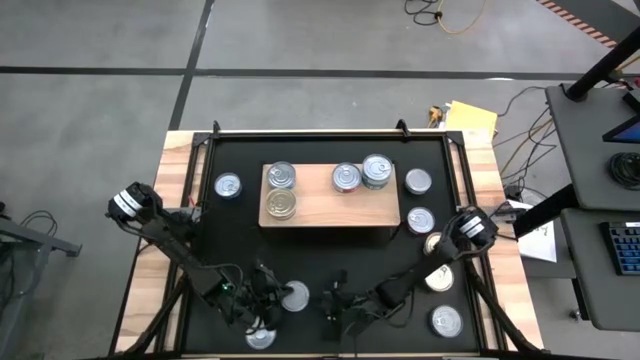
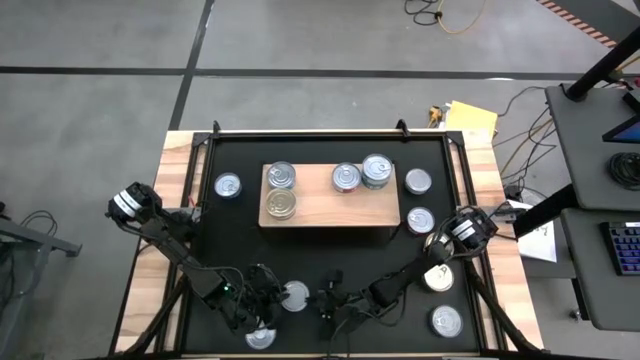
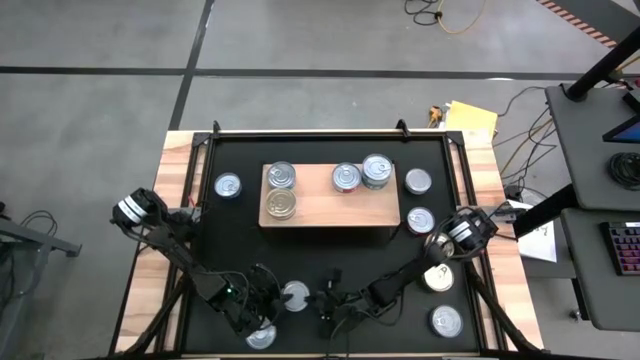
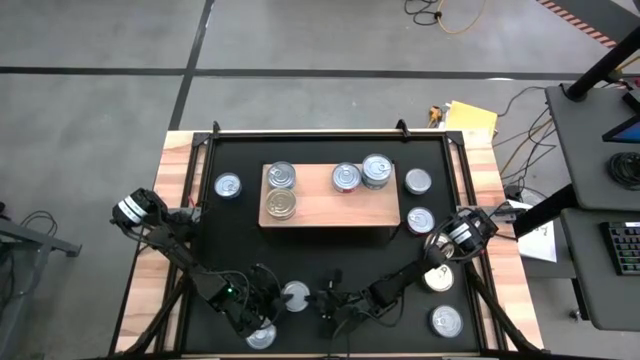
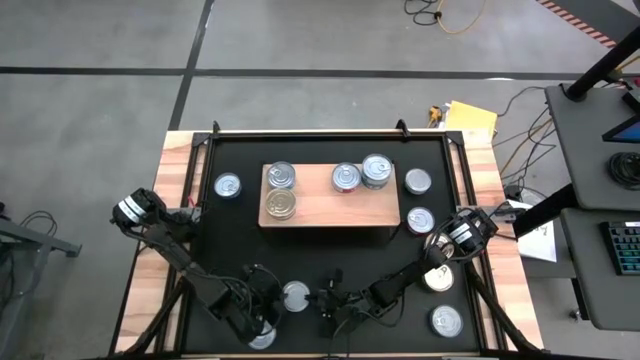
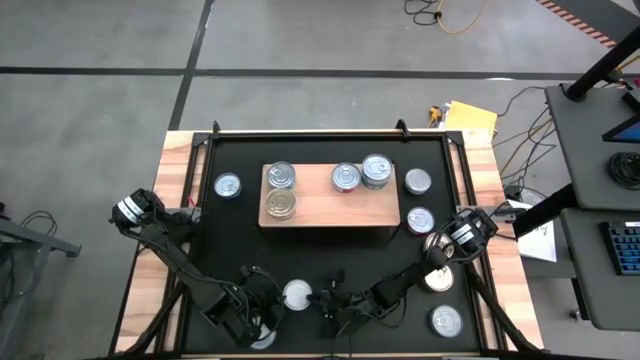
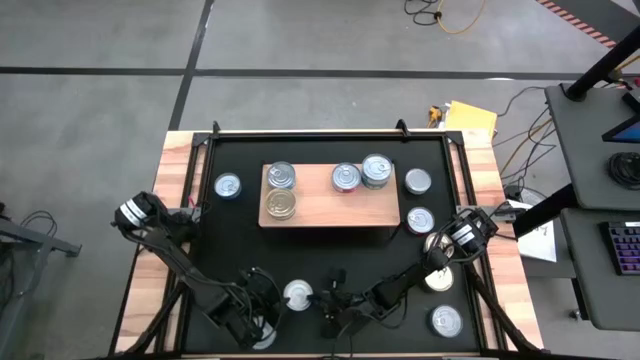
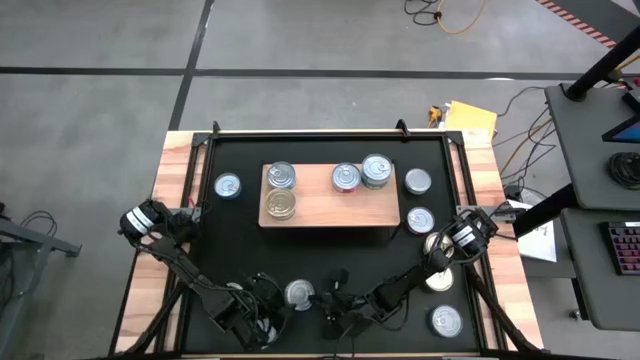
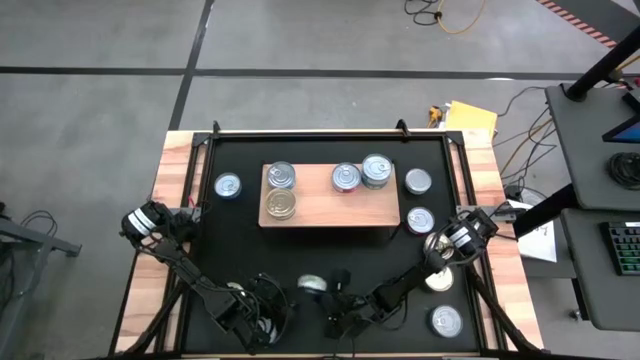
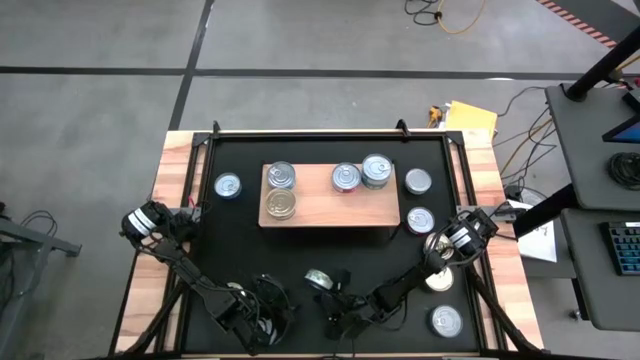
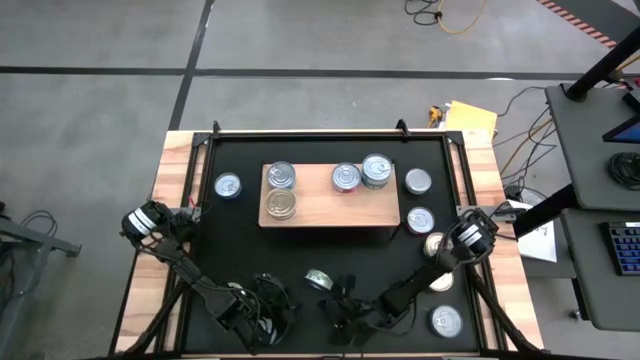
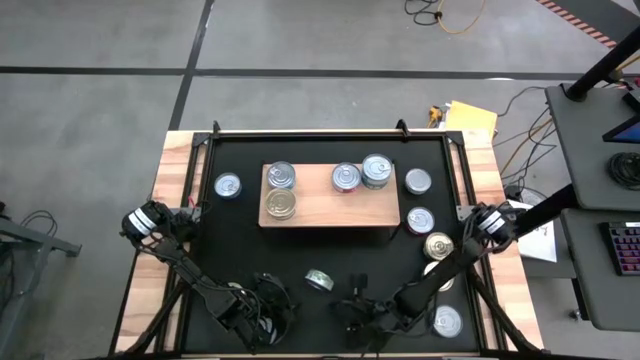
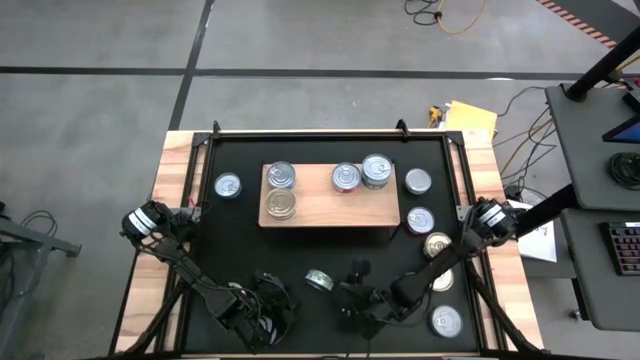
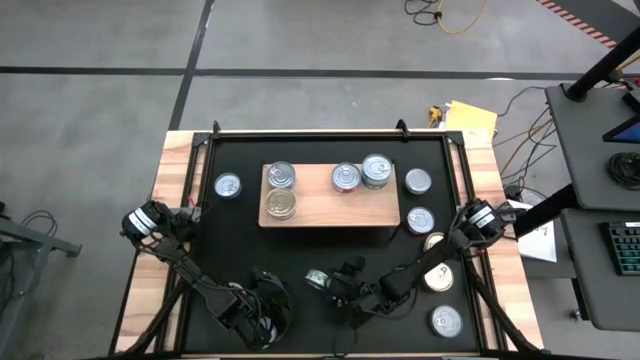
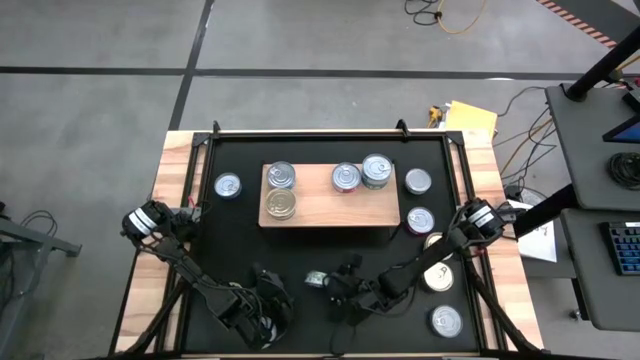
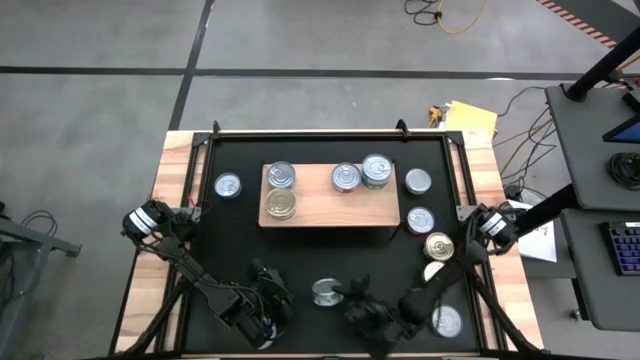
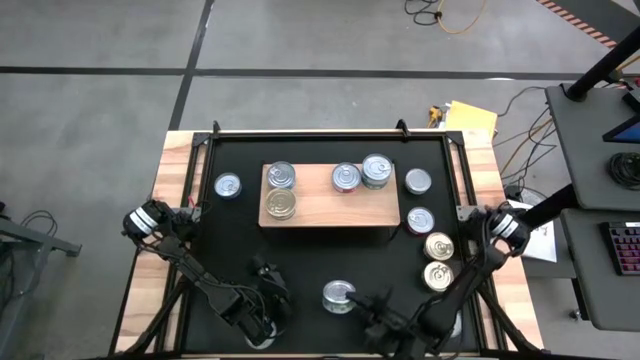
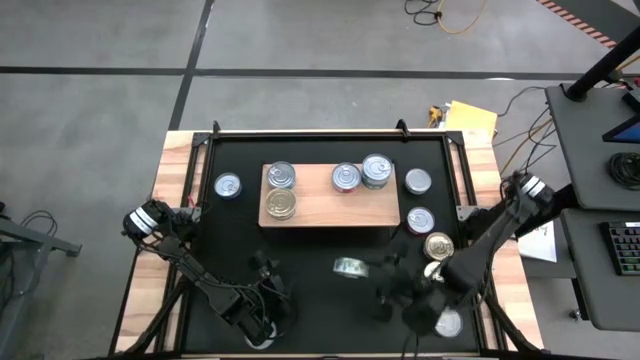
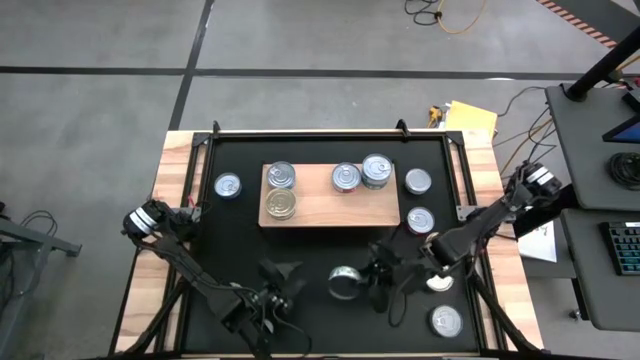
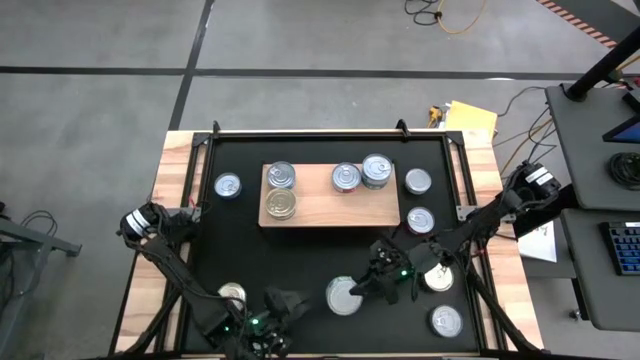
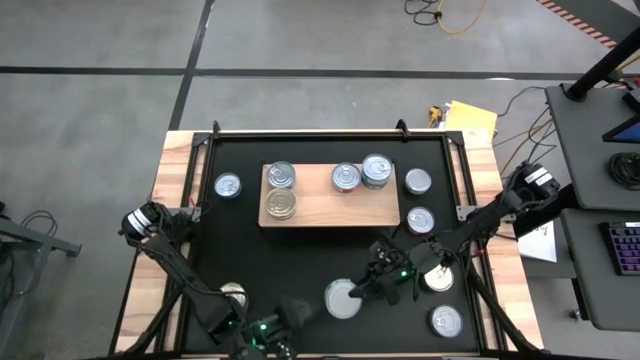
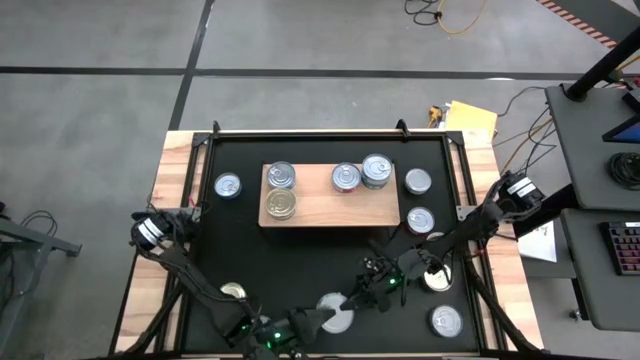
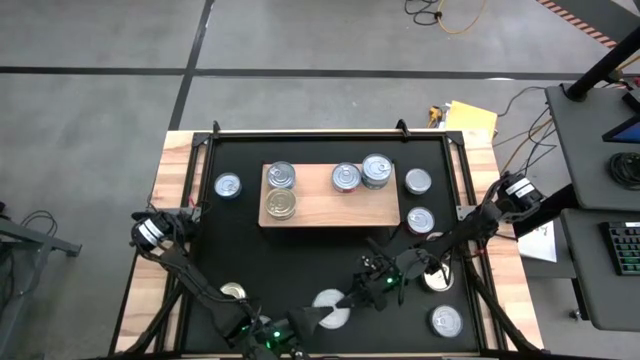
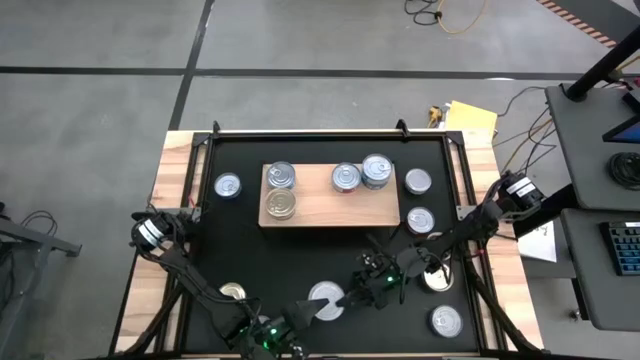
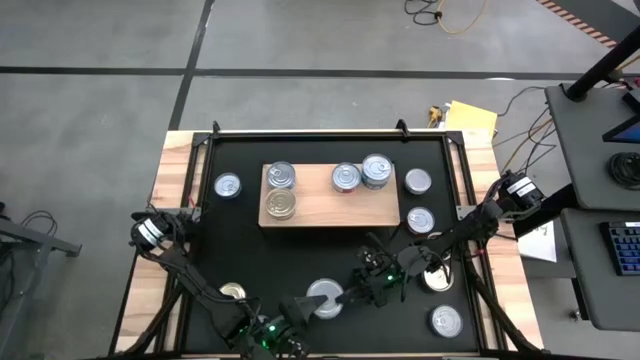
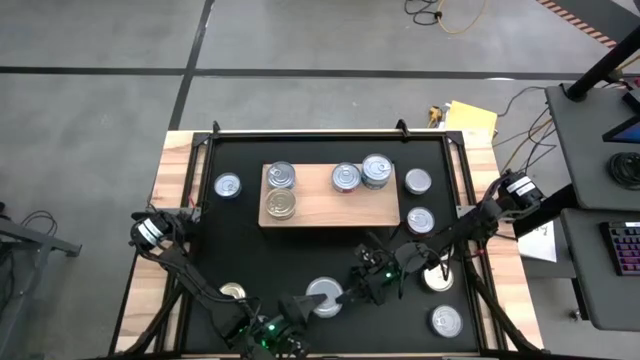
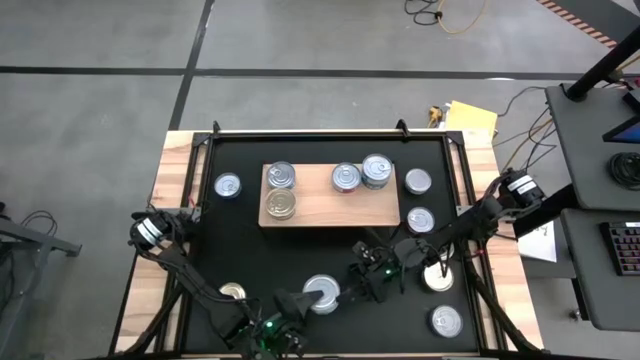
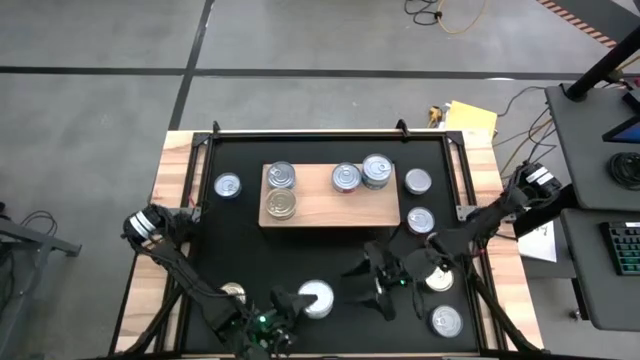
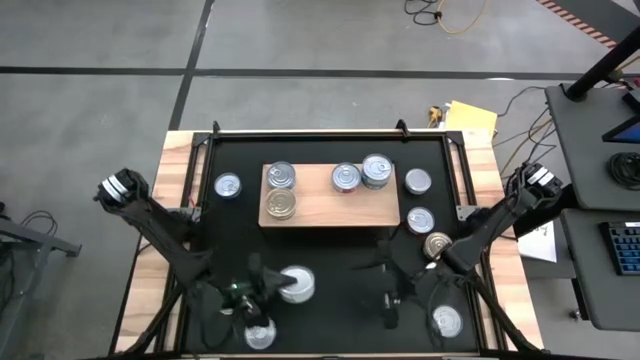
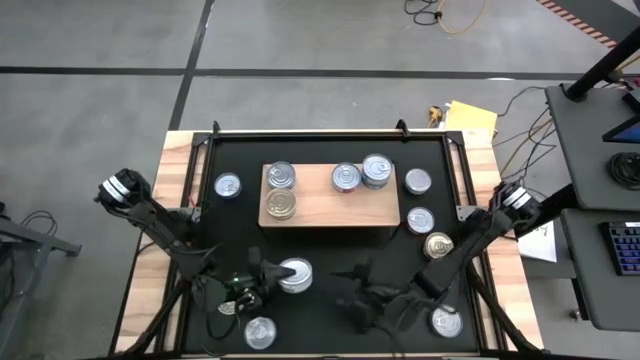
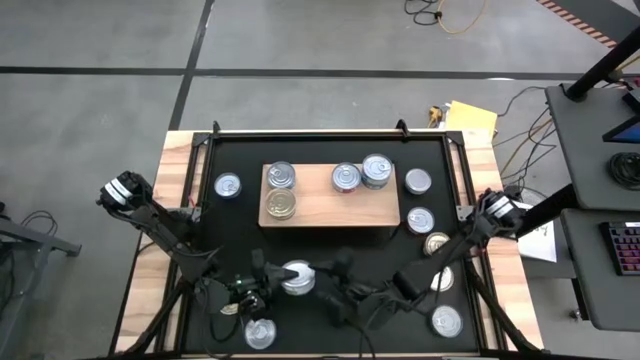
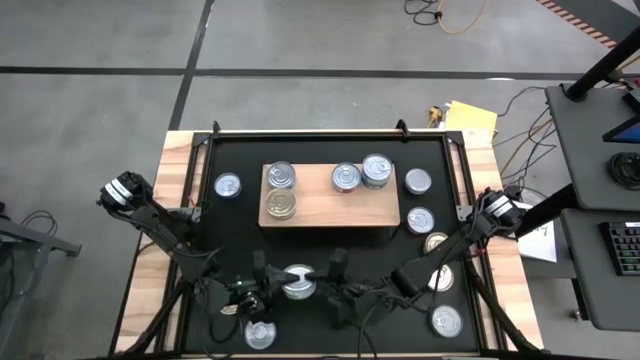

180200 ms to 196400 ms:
Task: Stack canned seafood by type on shelf
Put the green tuna can on the shelf

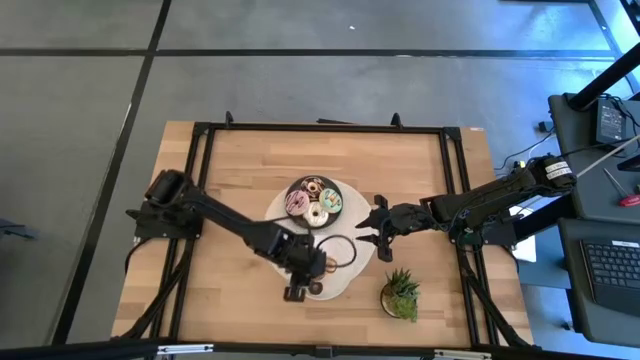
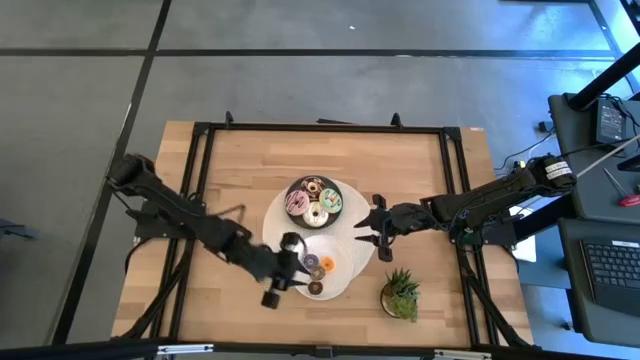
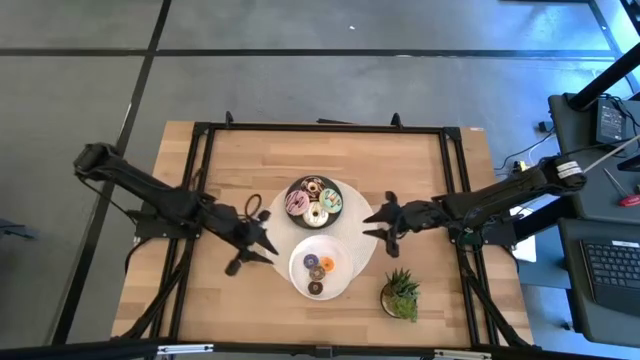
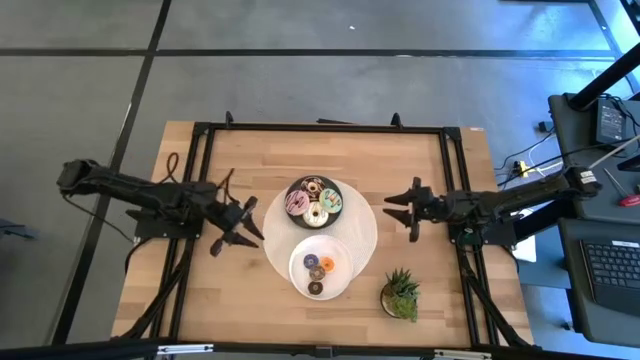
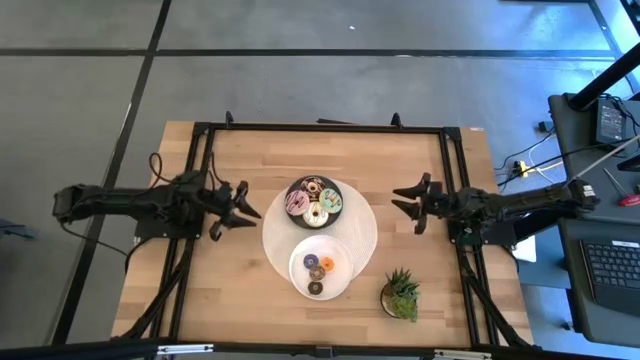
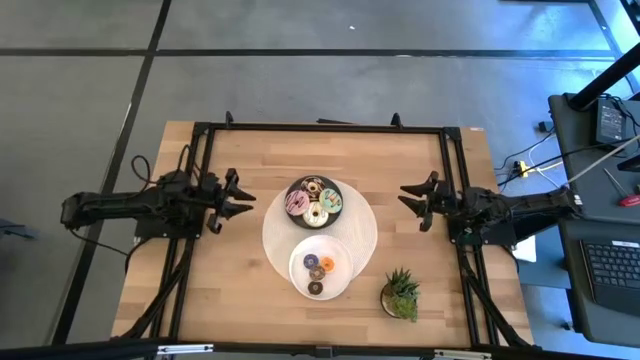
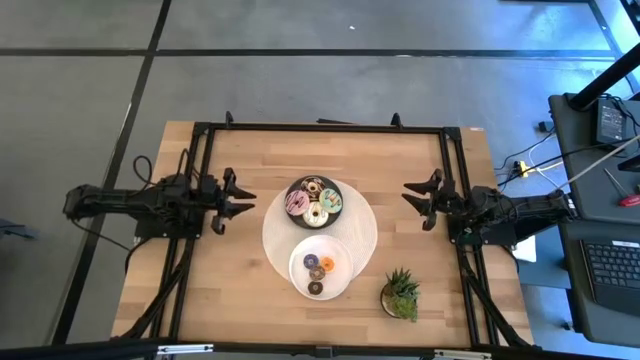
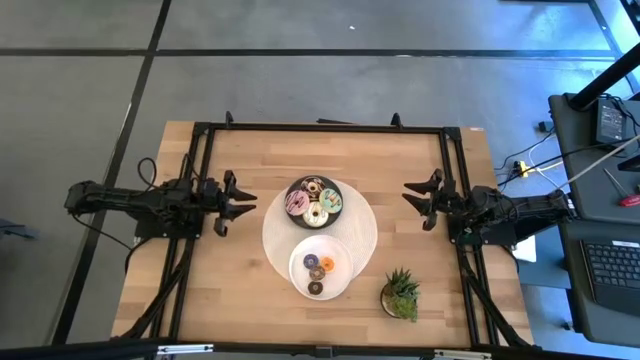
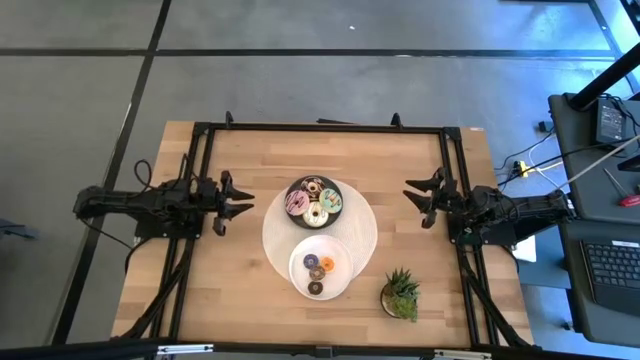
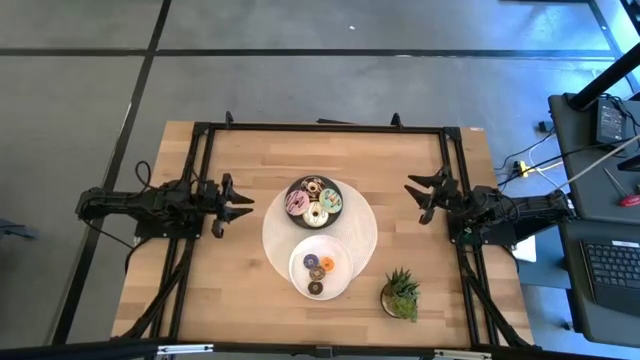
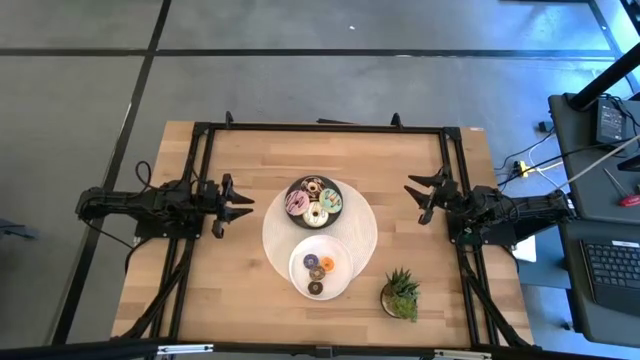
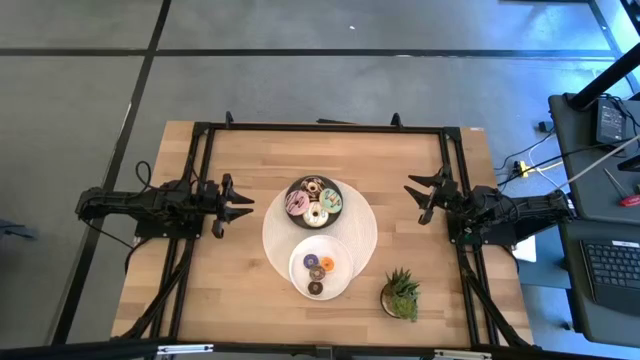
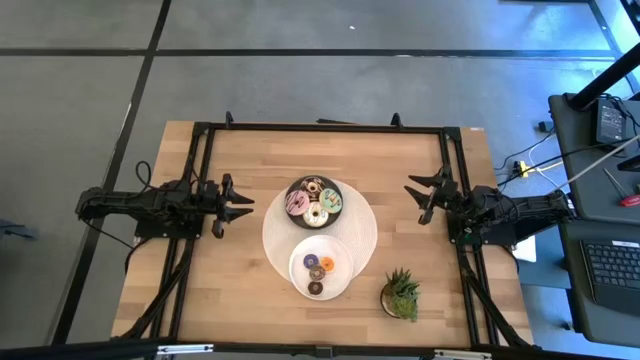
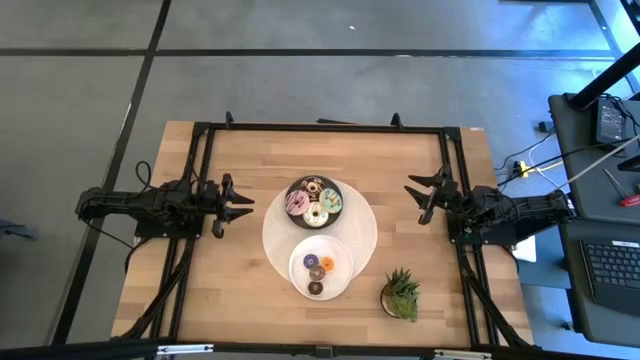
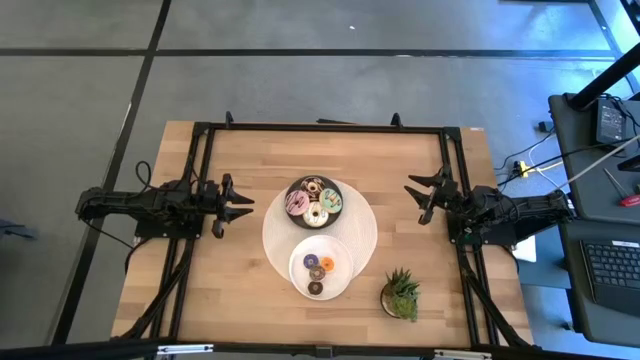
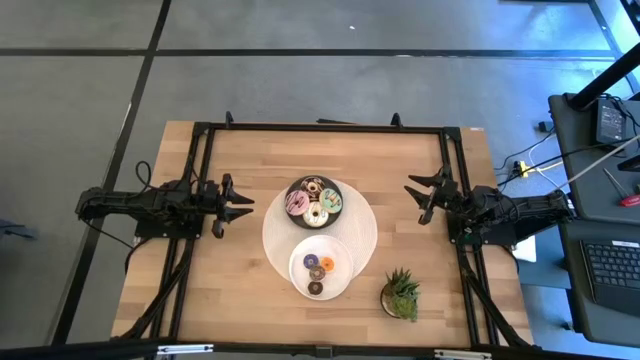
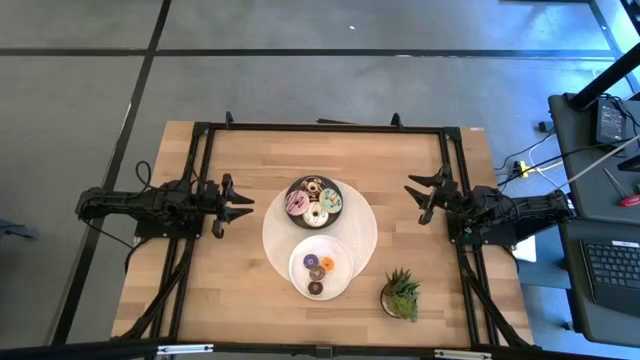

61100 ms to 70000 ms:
Task: Pick & Place donuts
Return to Home Position
